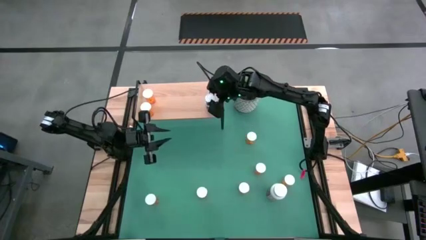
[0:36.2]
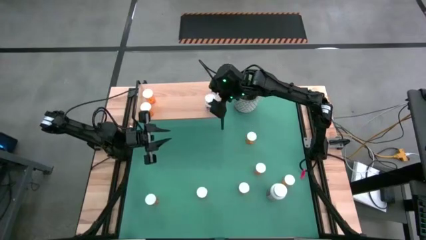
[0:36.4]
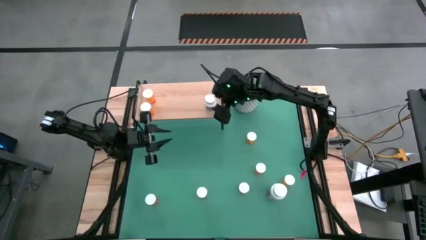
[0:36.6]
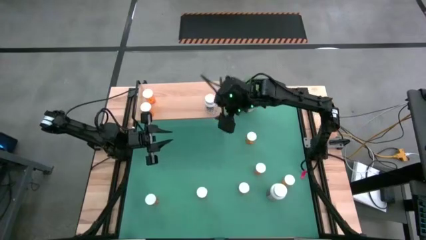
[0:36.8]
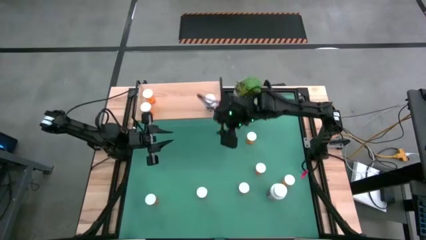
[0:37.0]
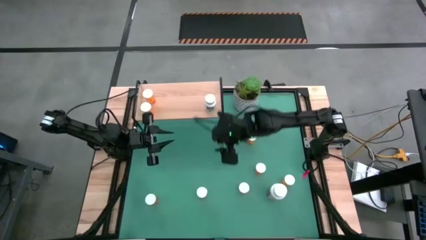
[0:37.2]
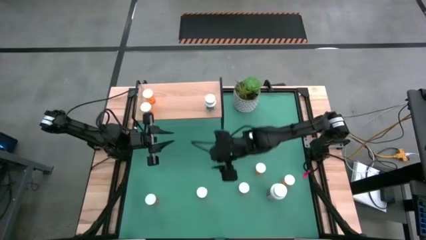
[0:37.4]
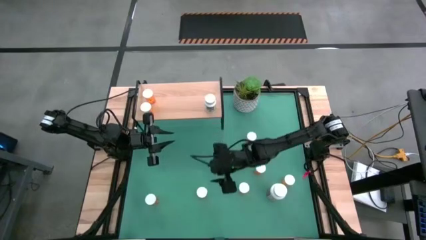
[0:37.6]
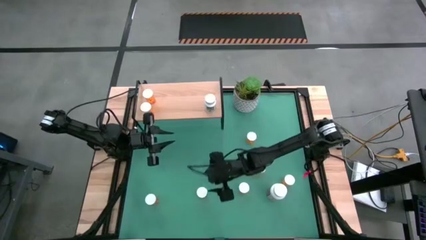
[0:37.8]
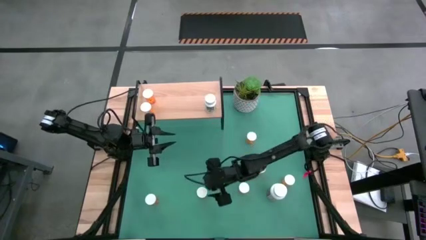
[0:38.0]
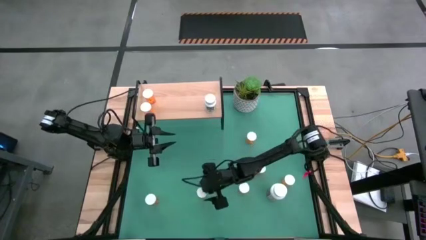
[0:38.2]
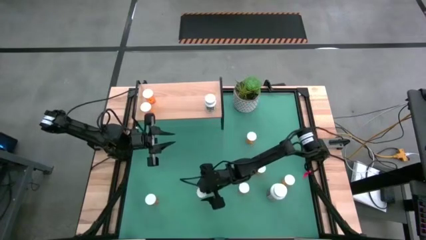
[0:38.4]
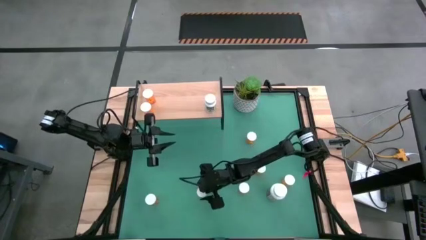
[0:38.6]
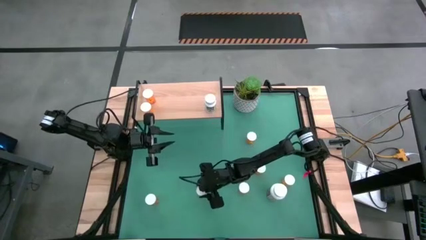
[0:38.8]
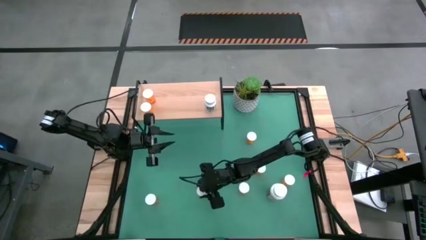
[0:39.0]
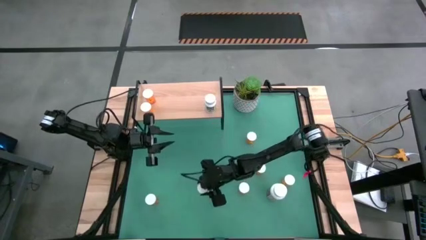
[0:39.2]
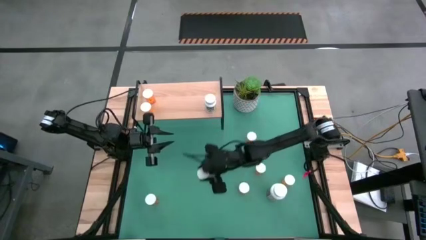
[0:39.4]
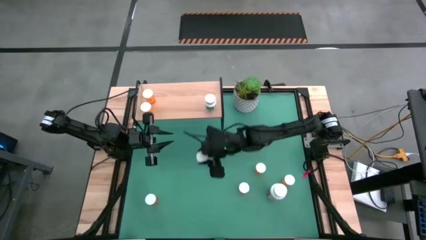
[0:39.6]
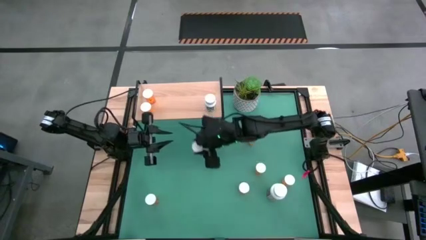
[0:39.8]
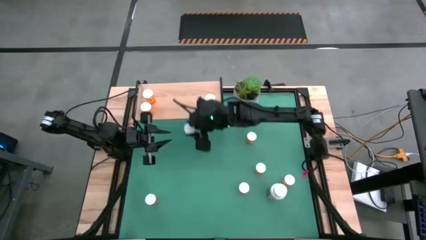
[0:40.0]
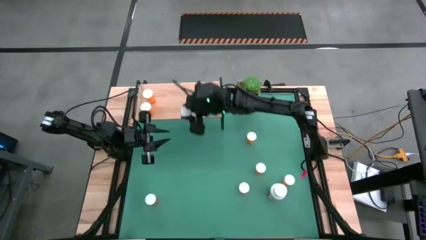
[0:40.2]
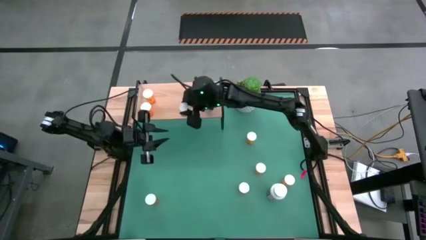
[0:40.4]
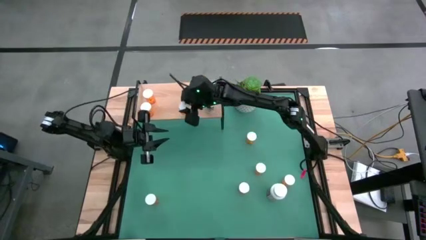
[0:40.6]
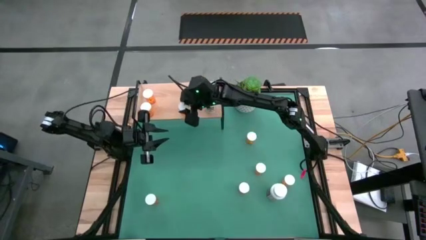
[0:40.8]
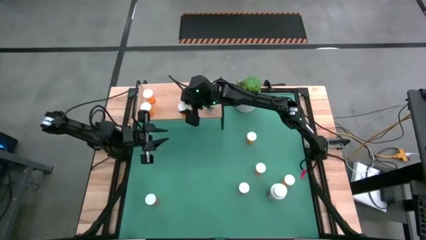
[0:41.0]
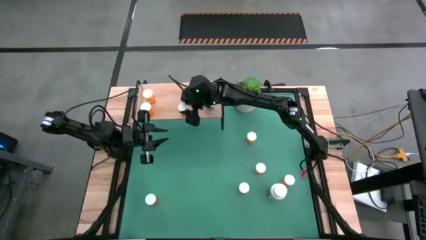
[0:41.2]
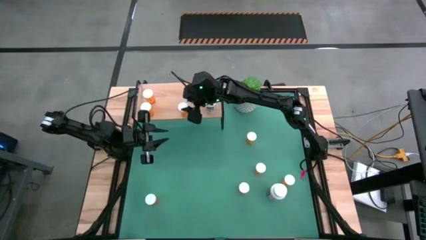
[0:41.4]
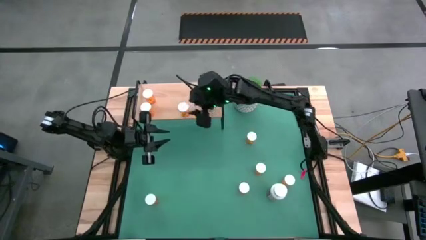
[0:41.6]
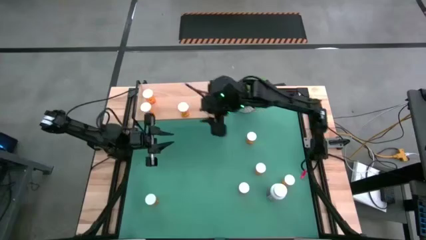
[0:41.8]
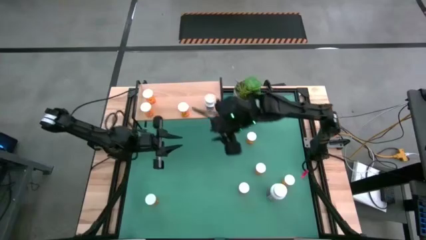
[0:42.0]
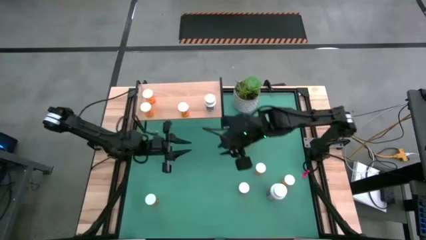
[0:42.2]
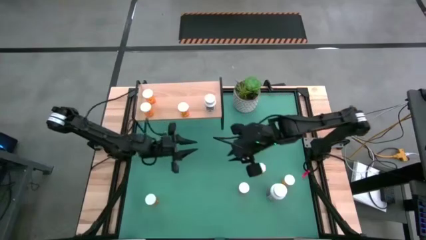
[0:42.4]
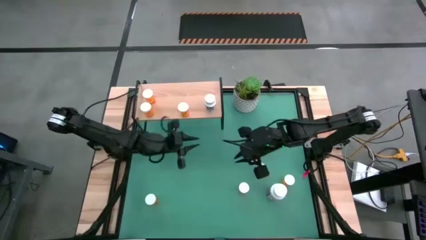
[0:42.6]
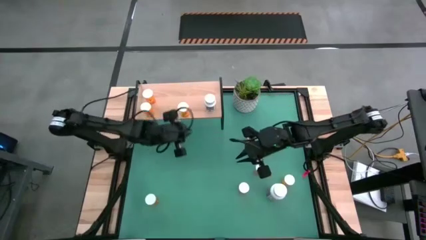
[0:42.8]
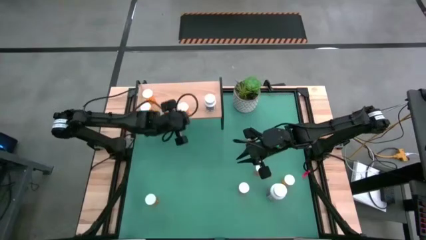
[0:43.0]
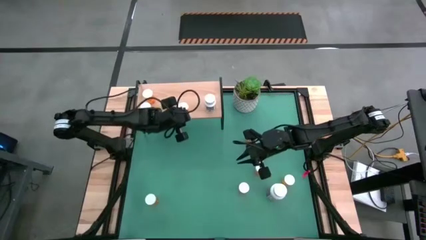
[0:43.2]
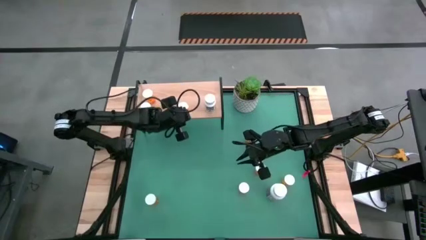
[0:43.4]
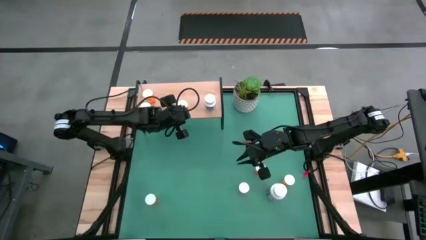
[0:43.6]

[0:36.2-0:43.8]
Task: Pick and place medicine bottles onto shelf by color
Put the orange pill bottle on the shelf

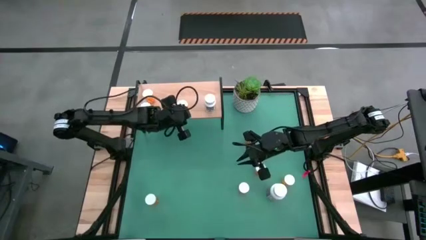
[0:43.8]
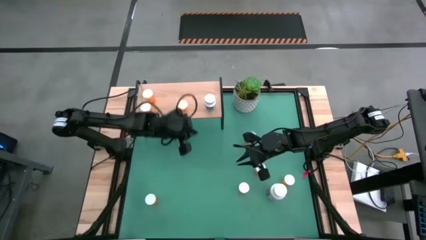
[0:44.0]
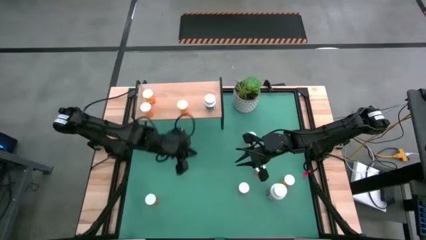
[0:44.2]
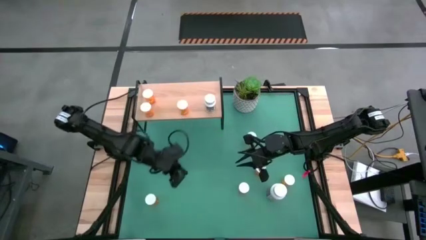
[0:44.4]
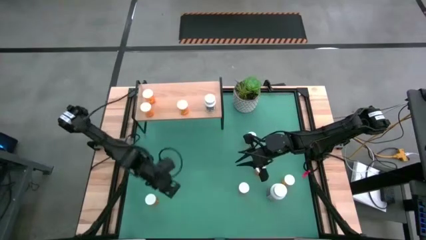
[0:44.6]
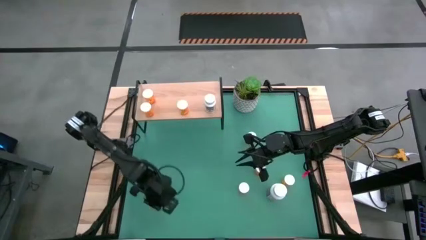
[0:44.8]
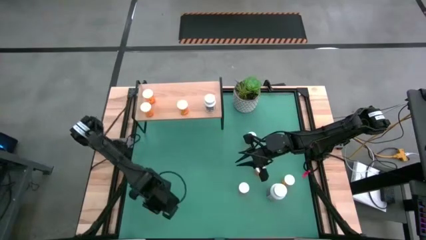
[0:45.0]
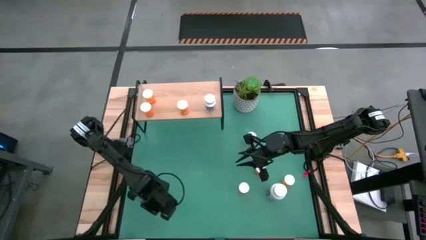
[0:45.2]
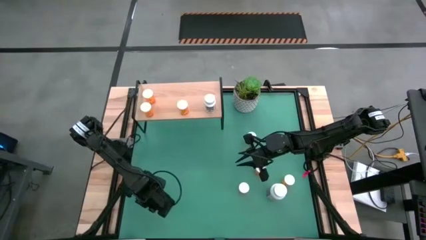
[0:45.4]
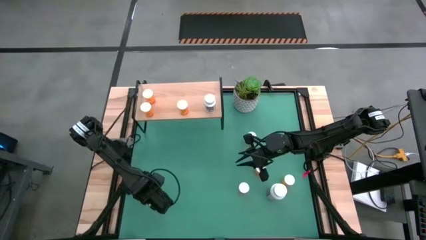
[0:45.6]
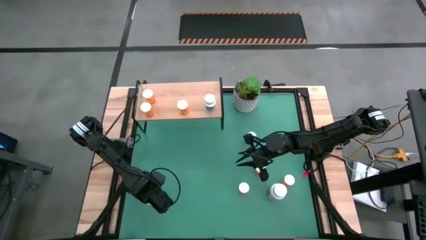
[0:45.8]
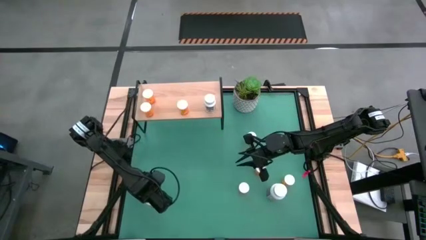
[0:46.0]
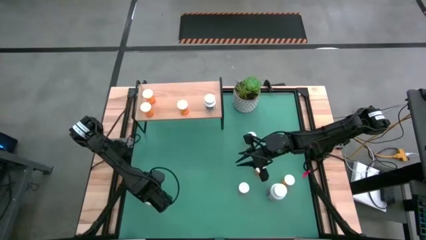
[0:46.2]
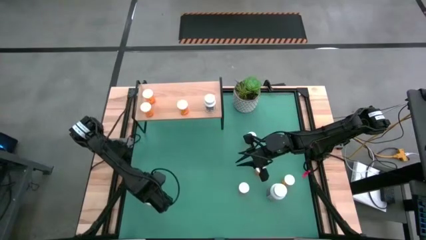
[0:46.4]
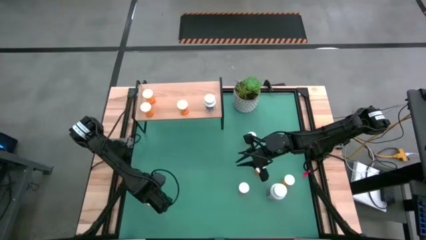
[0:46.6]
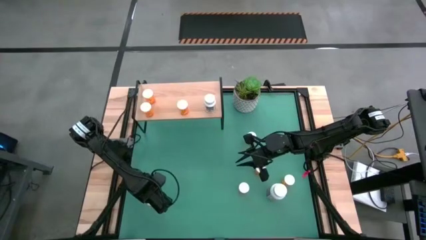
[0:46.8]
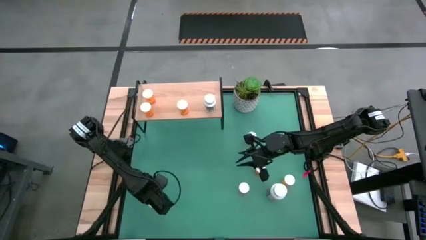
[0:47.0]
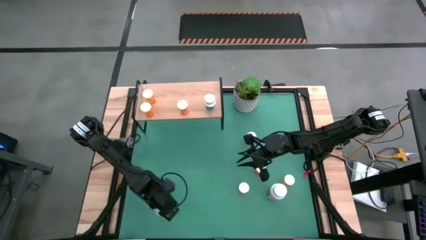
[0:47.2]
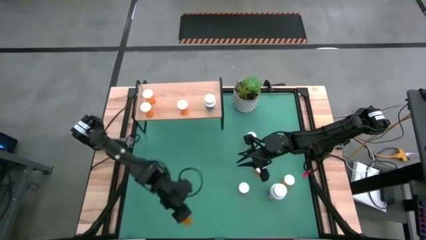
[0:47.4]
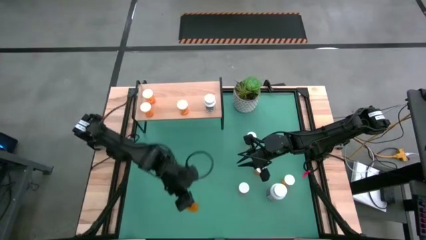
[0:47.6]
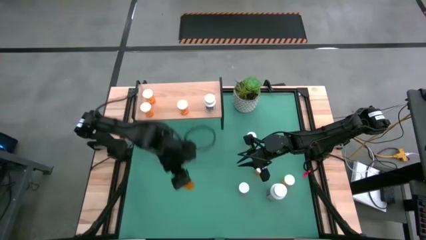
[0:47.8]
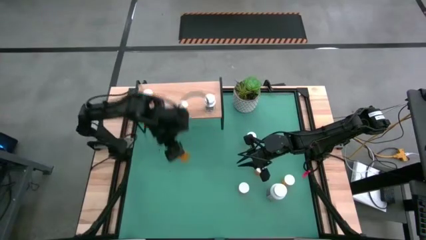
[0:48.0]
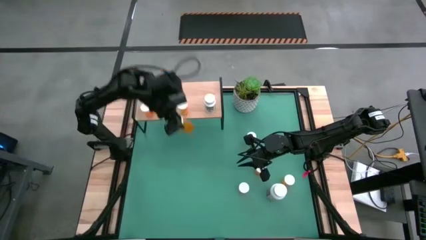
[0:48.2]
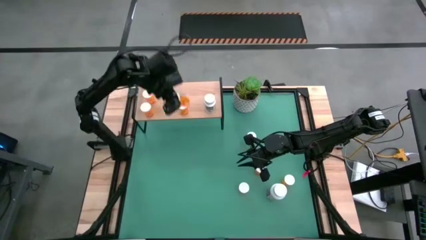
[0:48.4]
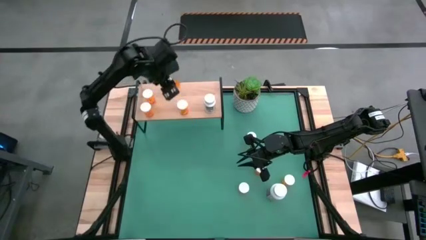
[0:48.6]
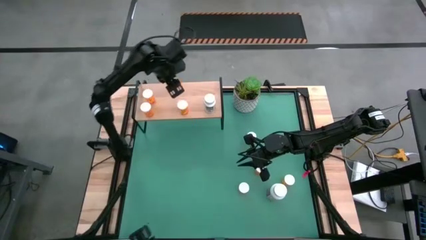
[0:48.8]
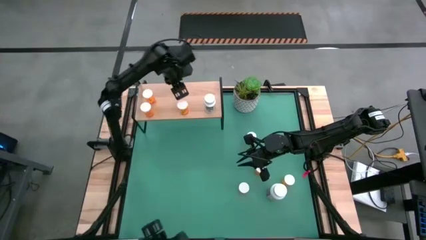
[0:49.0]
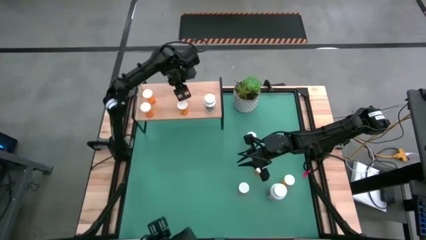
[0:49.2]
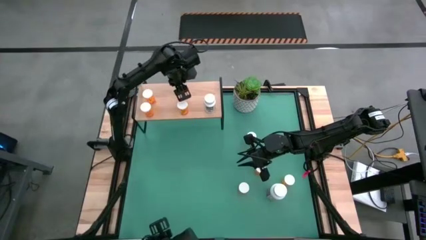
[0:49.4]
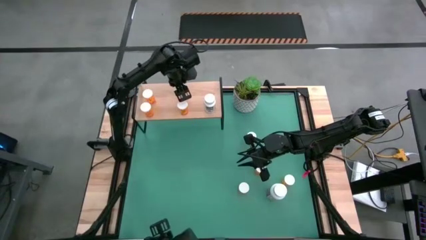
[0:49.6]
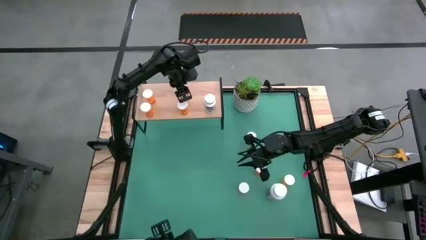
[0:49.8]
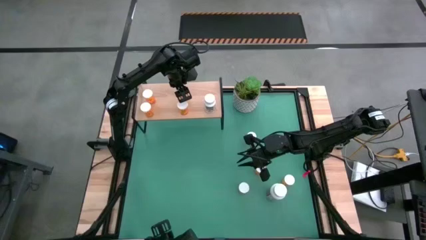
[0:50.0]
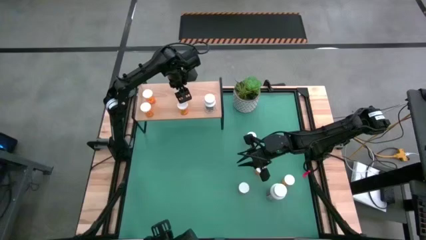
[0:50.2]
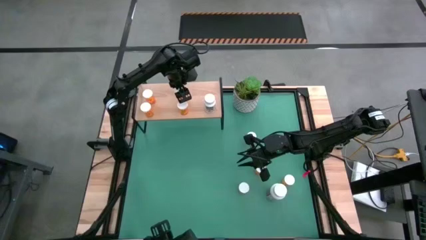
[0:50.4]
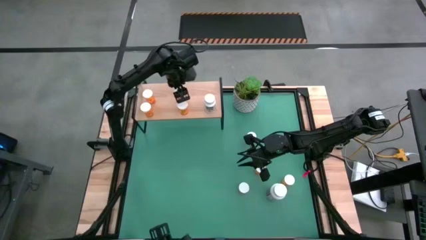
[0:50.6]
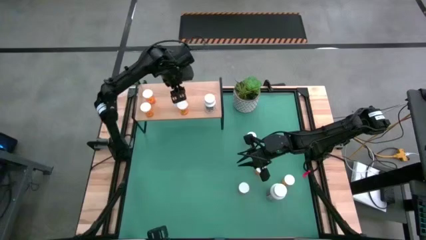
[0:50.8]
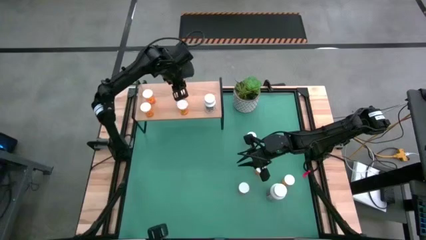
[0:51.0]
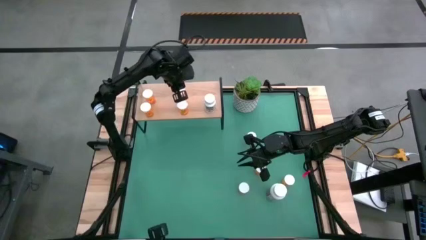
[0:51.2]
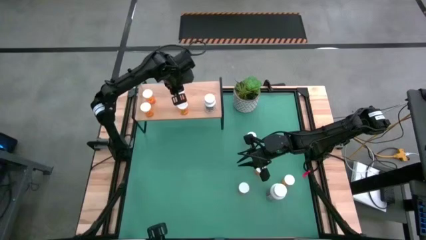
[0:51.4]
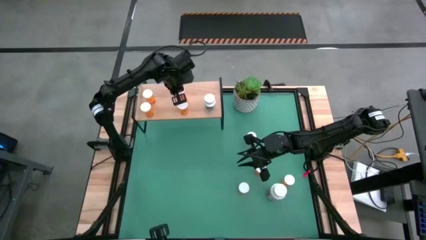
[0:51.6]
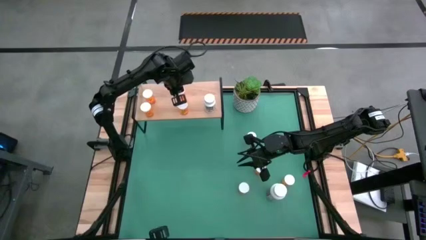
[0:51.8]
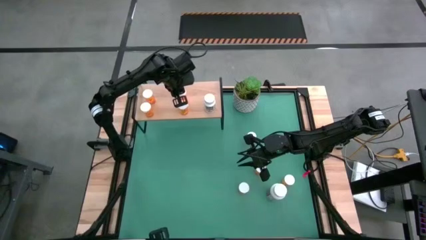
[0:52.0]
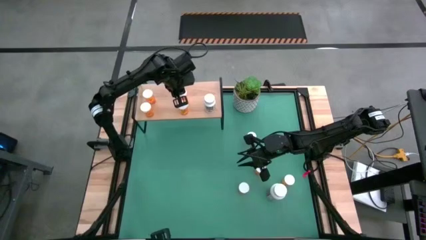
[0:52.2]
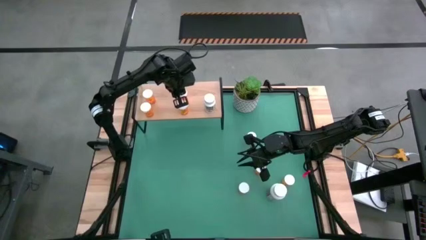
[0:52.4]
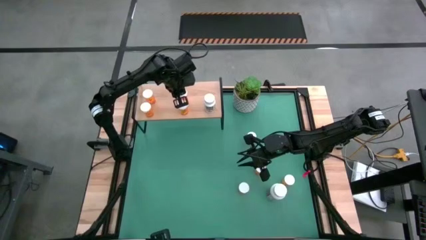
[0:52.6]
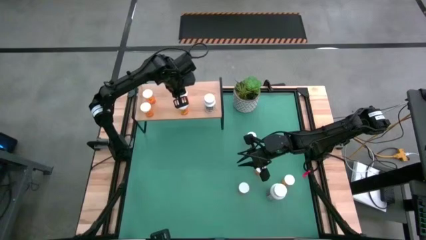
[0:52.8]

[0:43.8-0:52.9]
Put the orange pill bottle on the shelf aligned with the other orange pill bottle
